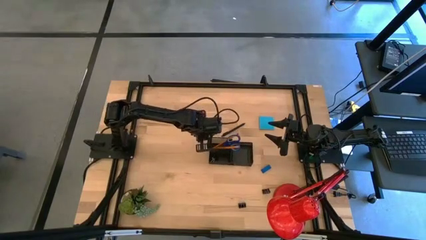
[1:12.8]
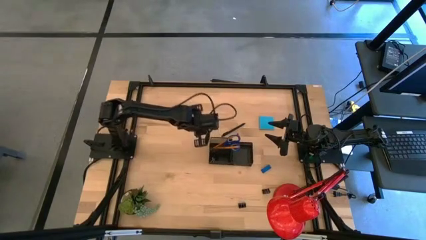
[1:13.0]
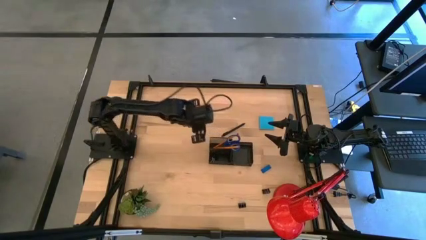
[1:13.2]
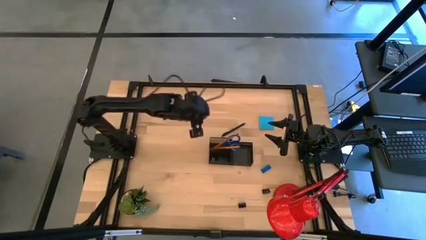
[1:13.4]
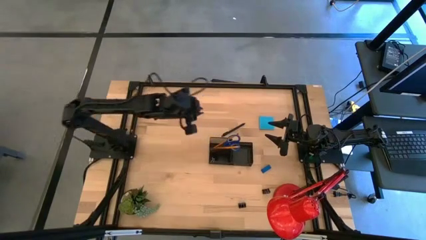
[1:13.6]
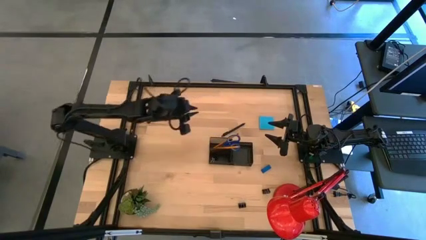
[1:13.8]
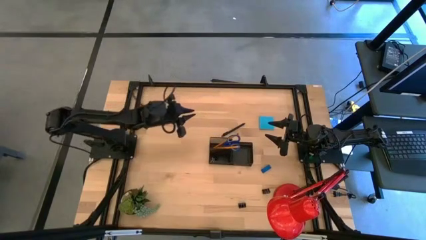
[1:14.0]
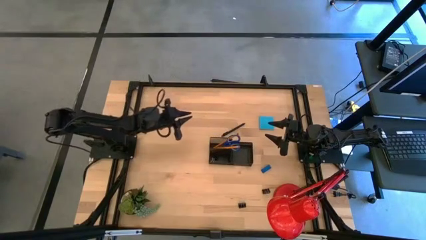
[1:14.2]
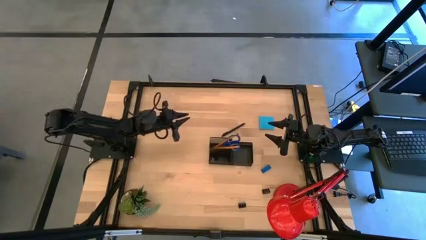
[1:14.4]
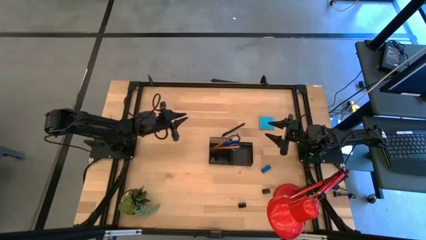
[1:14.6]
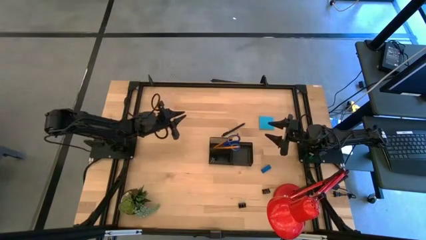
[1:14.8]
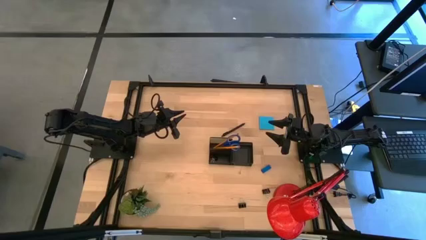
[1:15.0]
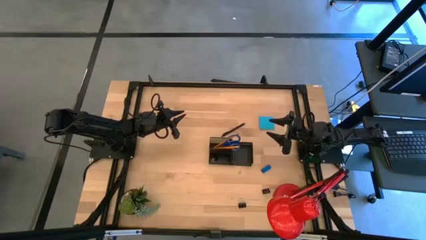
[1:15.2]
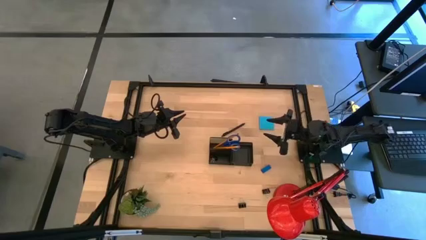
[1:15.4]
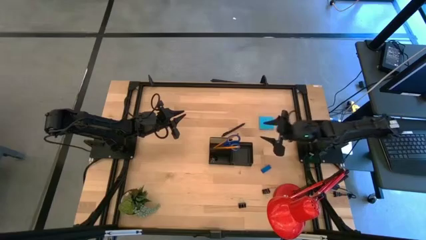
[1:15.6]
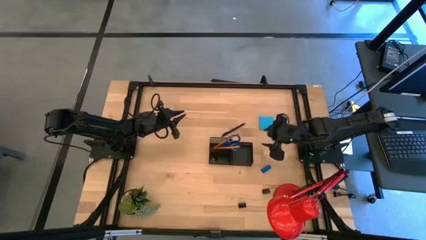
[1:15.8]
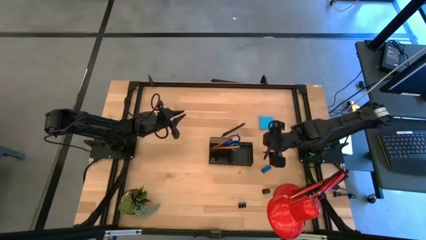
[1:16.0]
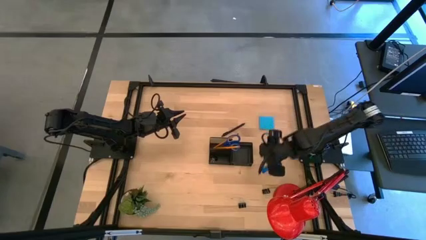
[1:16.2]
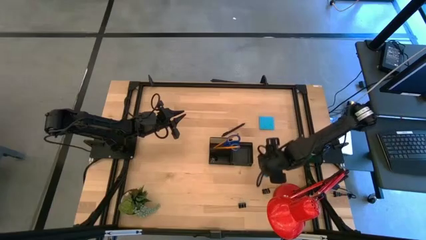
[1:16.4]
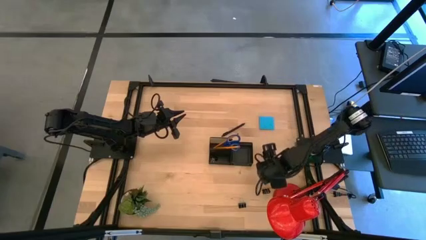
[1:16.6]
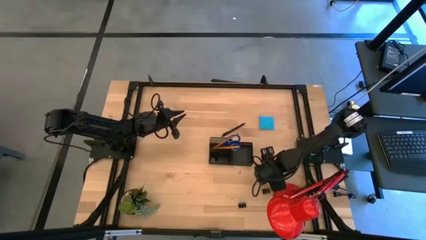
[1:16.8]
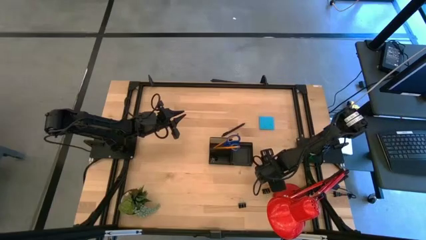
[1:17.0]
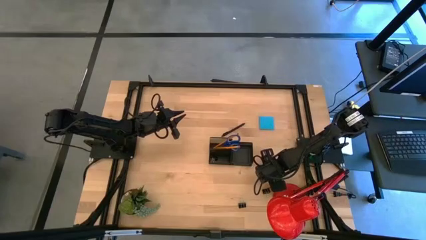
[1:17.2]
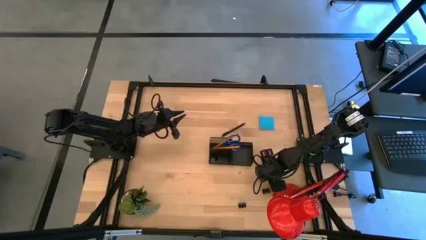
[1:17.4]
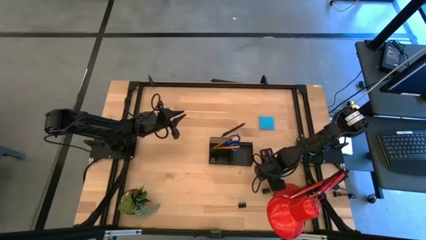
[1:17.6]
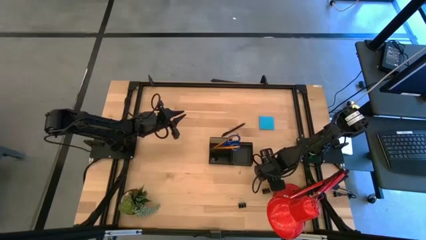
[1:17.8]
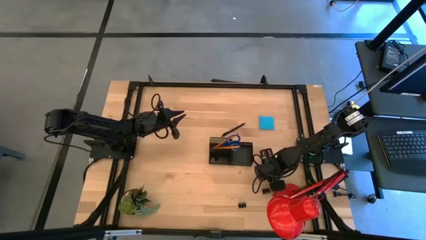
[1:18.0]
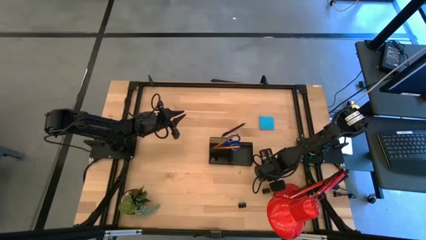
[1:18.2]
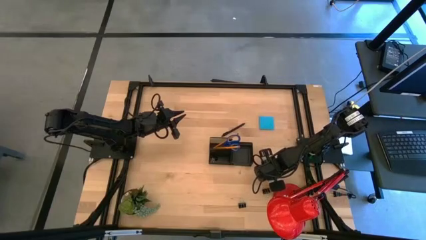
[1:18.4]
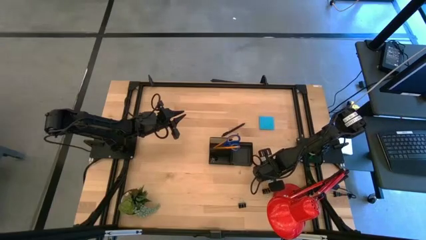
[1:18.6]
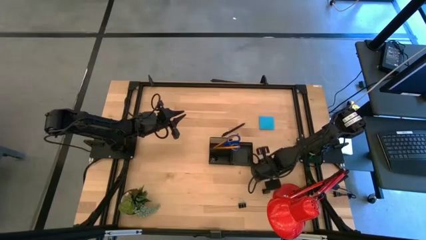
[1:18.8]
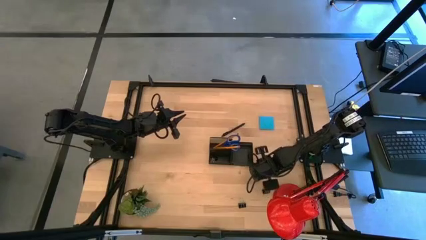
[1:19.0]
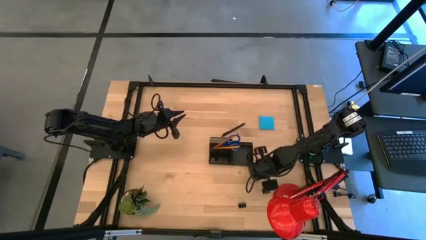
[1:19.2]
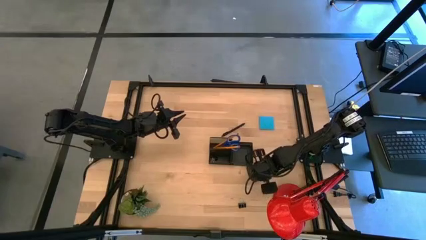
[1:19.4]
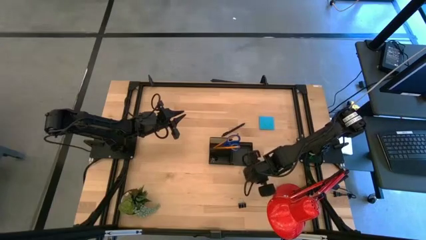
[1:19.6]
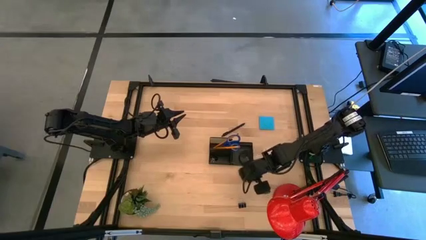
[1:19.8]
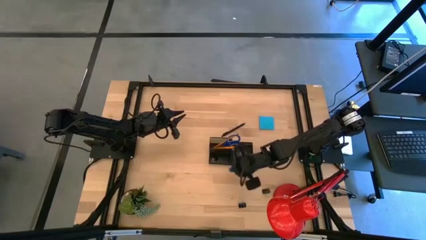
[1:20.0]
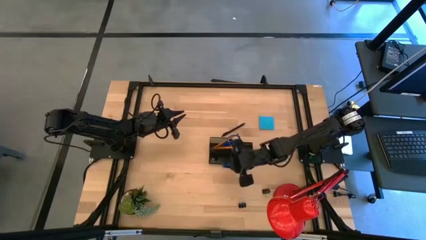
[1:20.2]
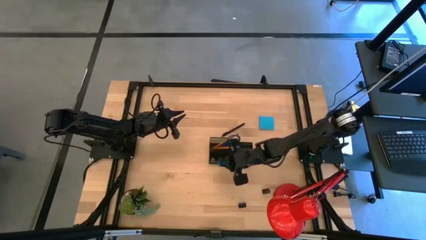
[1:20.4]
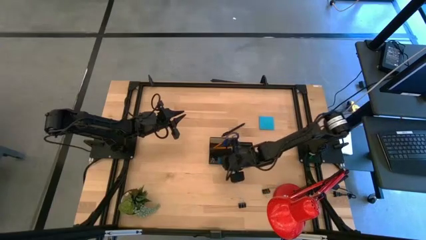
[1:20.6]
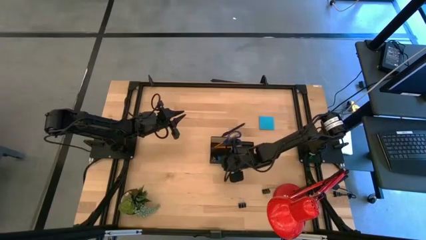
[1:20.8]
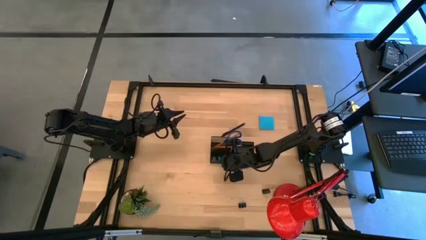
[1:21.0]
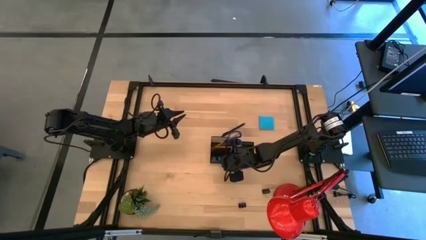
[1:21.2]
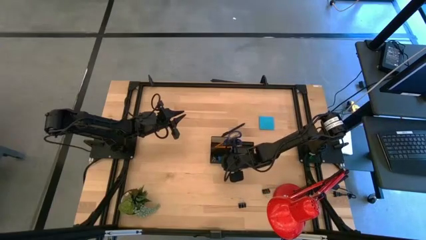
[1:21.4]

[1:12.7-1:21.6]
Task: Pick and place office supplies into organizer
Put the blue eraser into the black desk organizer

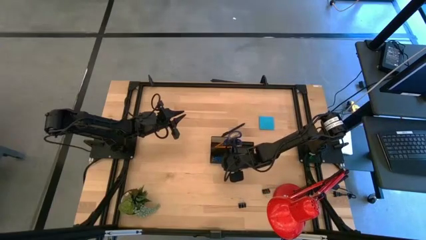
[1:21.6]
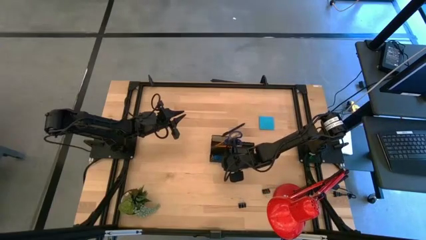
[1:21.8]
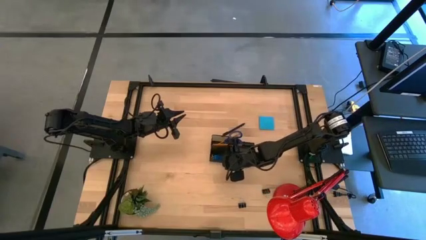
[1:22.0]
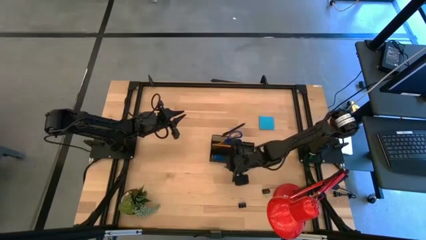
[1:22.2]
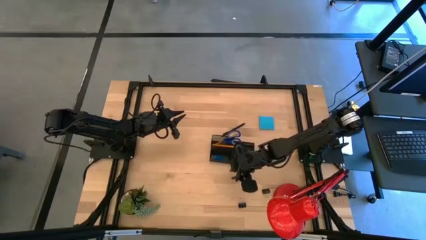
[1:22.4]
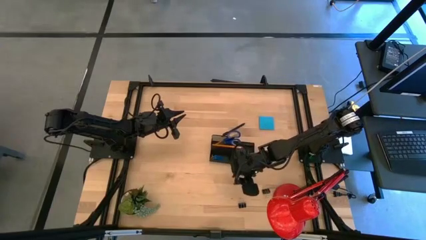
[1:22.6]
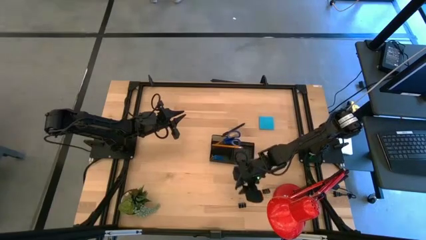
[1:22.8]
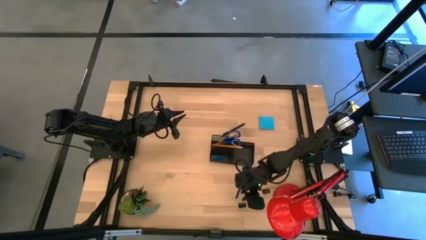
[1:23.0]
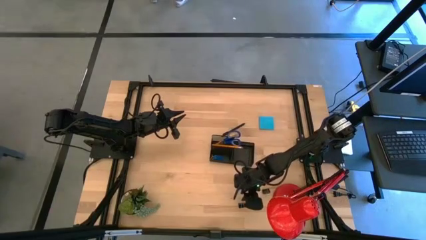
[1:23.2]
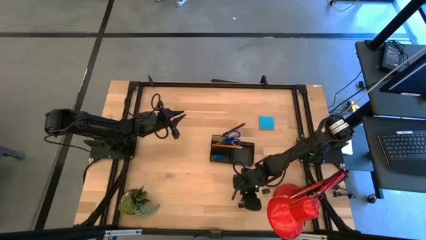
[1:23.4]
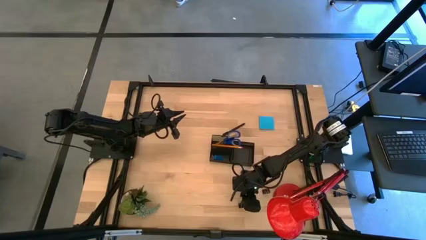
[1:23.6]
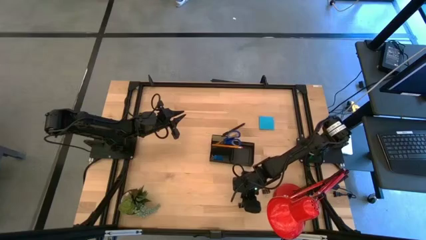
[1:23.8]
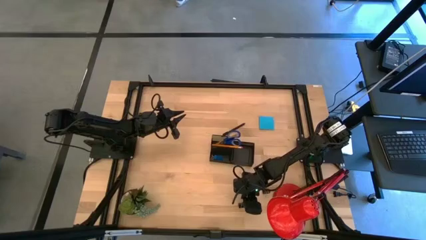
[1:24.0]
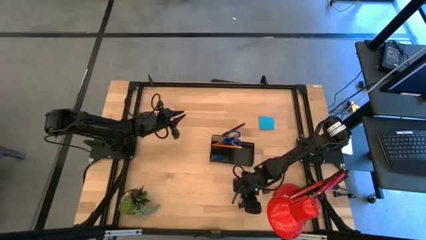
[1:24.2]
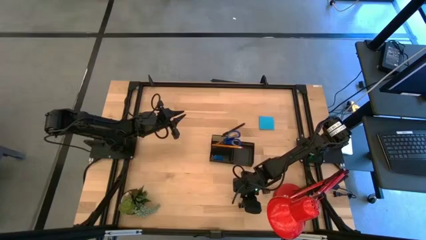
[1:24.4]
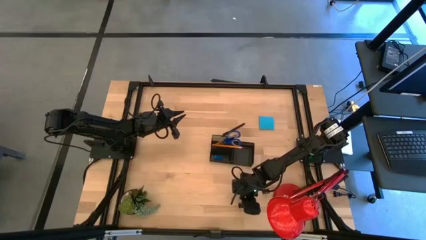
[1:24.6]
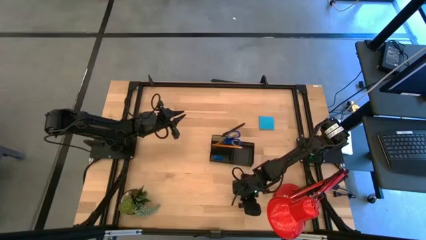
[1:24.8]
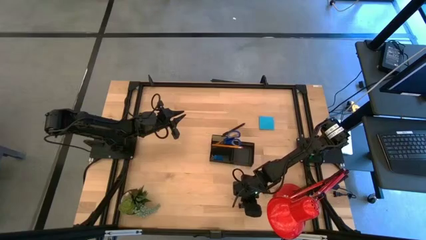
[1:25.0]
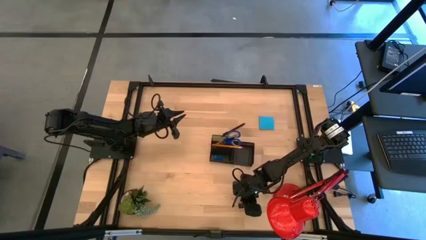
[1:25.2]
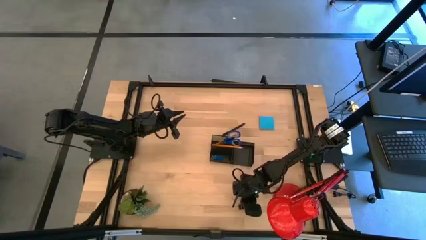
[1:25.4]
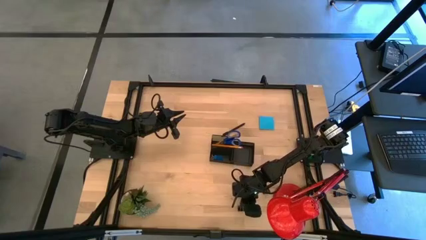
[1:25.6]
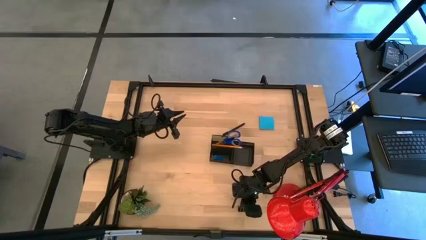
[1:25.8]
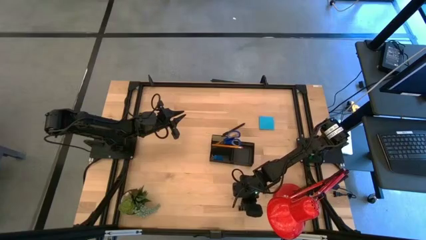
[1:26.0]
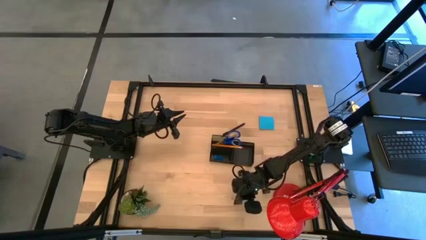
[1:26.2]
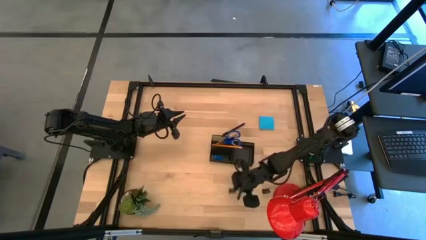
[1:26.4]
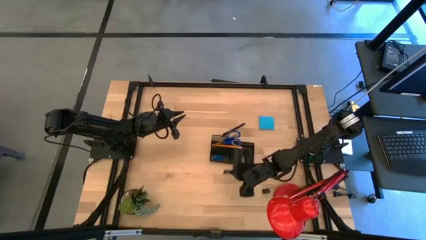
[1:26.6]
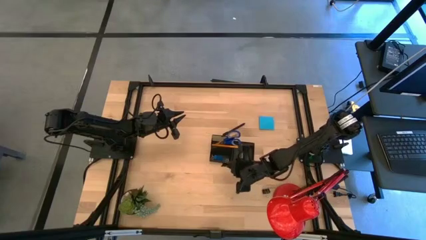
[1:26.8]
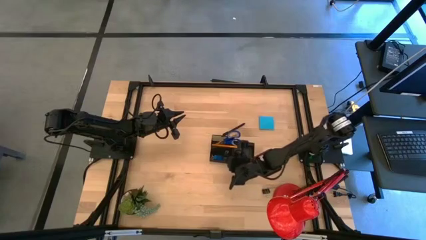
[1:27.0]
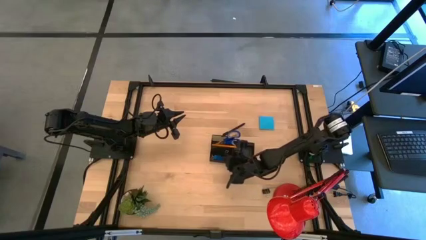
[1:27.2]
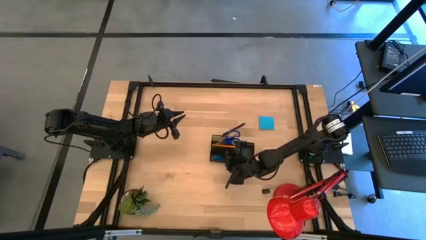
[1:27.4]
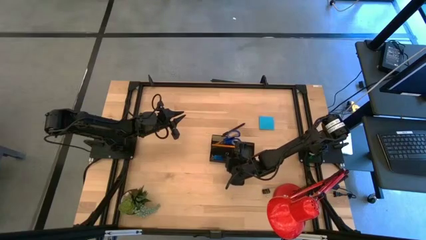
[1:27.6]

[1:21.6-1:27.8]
Put the left black binder clip into the black desk organizer

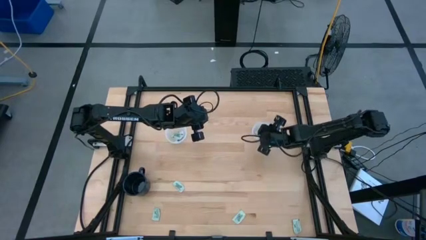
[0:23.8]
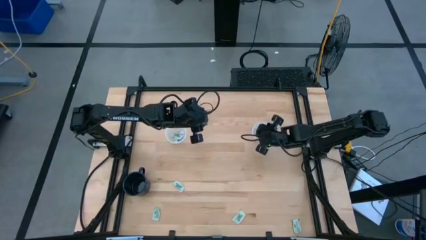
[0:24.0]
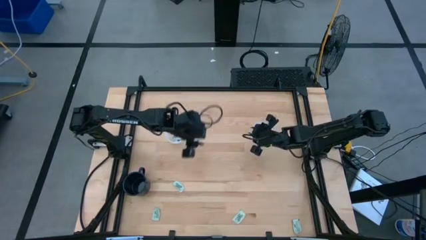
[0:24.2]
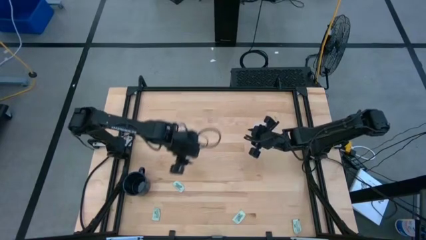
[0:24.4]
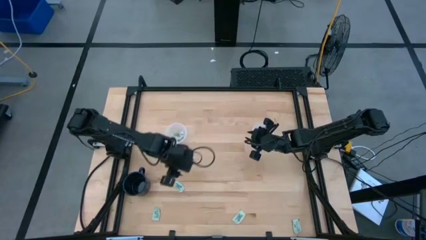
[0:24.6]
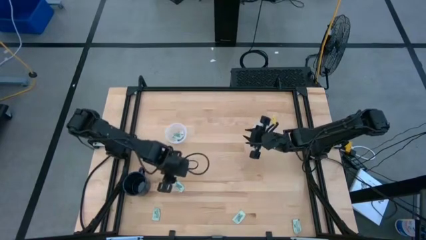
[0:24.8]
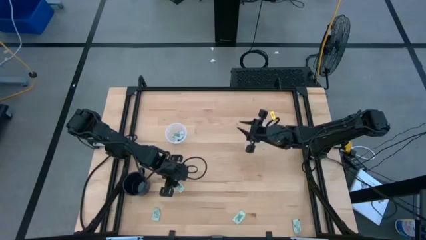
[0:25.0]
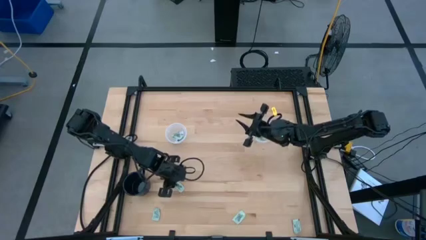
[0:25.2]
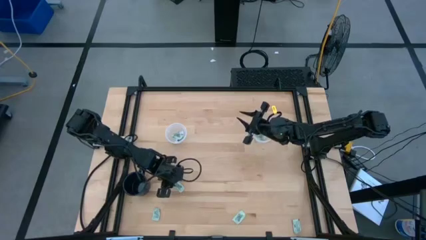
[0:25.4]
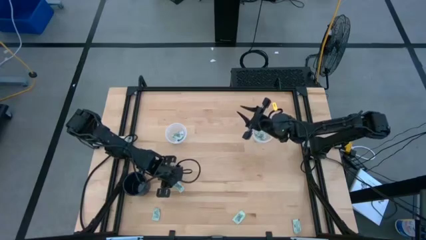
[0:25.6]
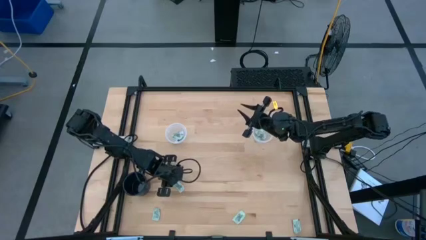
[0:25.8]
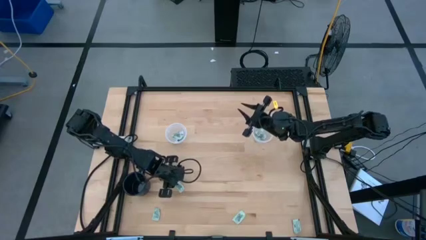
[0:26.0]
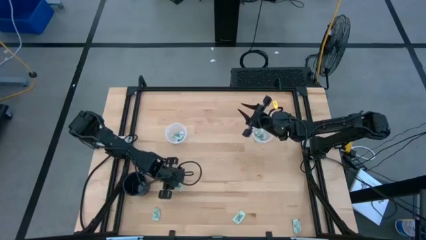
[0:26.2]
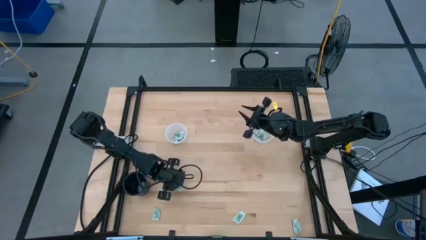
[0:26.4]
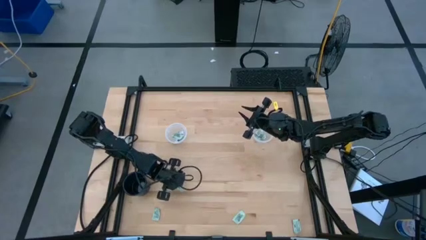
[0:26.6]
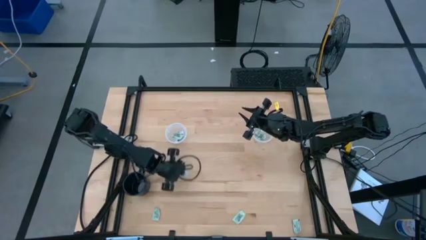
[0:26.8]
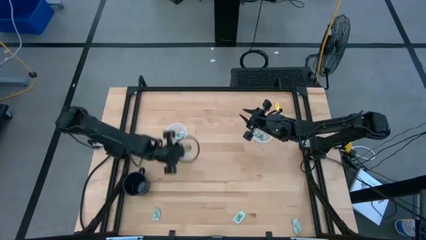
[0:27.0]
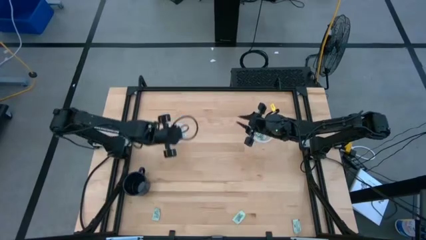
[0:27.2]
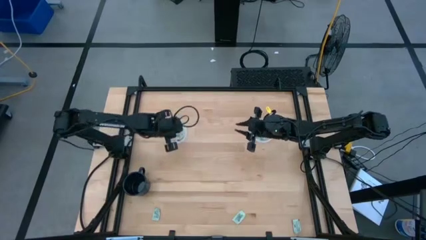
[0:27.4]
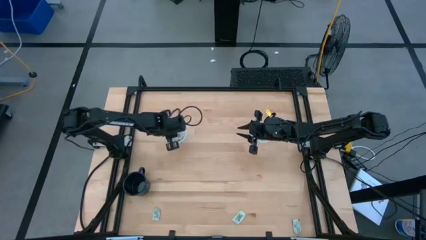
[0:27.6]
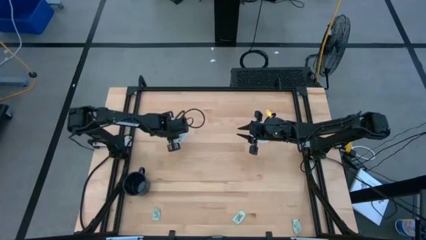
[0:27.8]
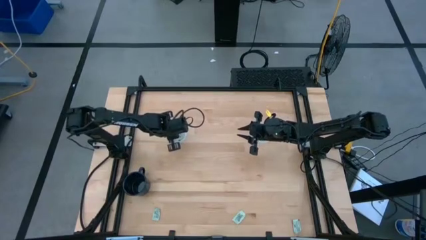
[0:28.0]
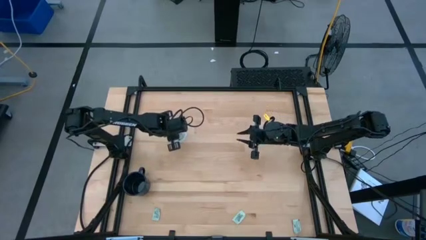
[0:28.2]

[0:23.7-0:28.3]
Task: Pick and place Stevia / Truvia into bins
Put the stevia packet into the left transparent container
